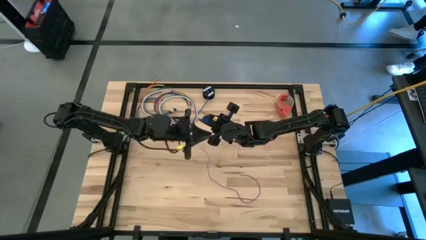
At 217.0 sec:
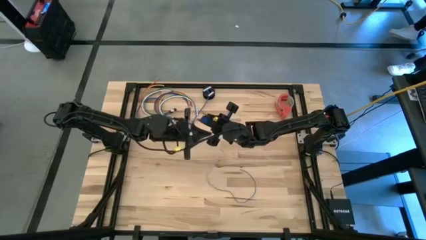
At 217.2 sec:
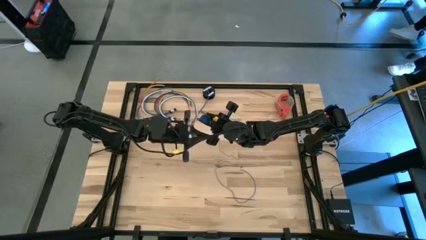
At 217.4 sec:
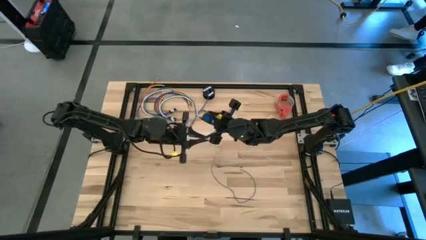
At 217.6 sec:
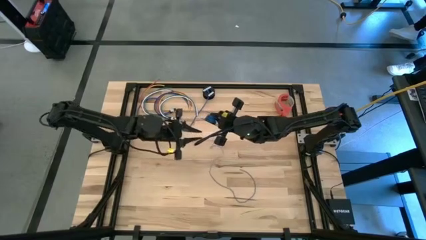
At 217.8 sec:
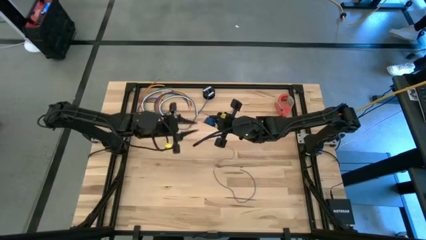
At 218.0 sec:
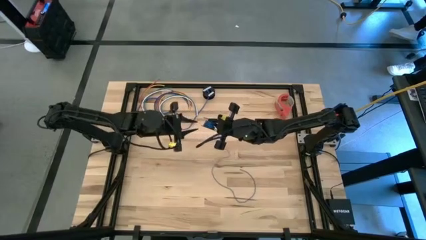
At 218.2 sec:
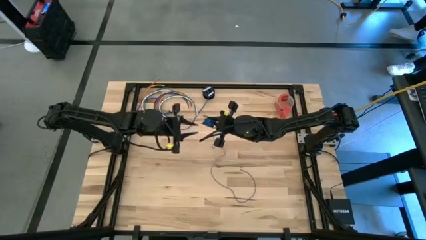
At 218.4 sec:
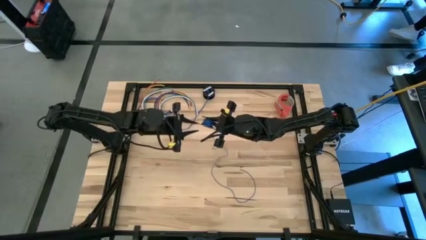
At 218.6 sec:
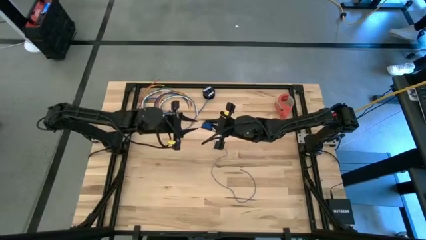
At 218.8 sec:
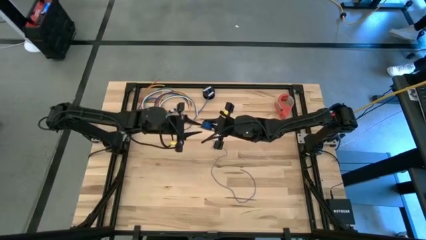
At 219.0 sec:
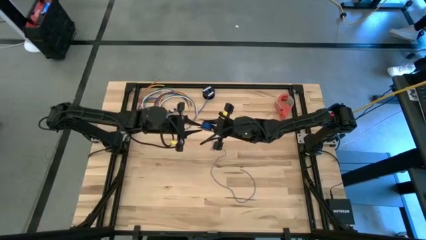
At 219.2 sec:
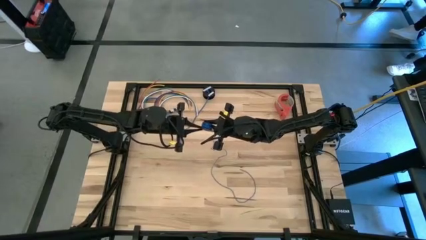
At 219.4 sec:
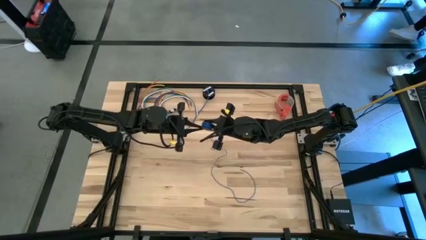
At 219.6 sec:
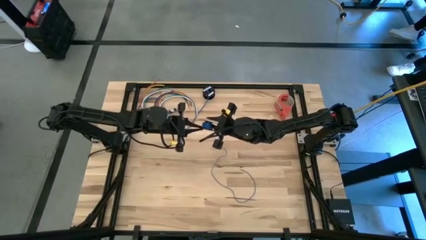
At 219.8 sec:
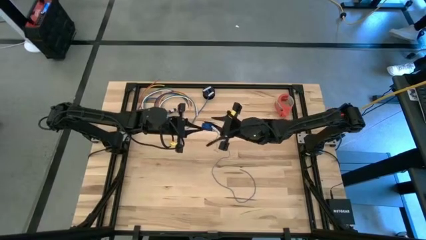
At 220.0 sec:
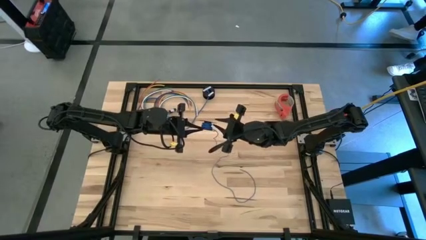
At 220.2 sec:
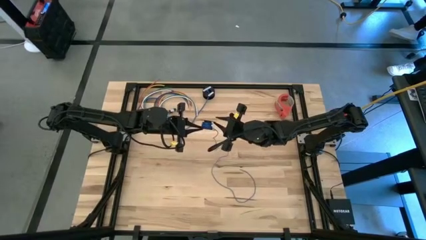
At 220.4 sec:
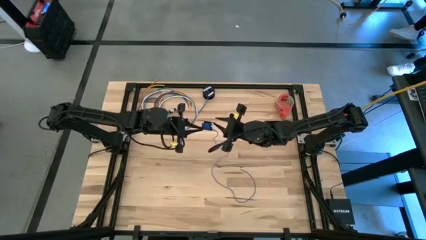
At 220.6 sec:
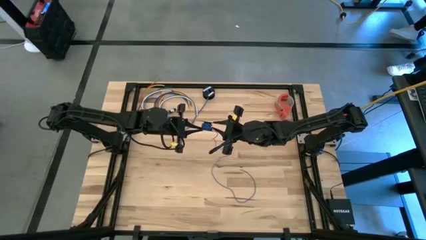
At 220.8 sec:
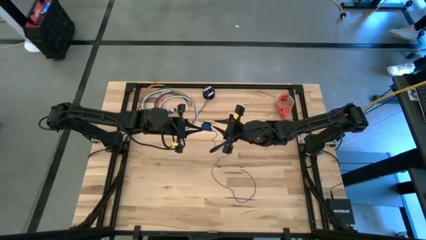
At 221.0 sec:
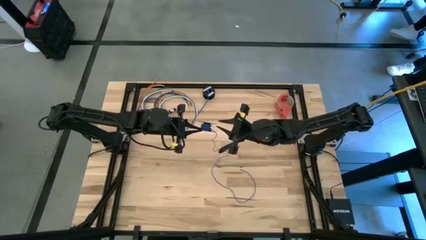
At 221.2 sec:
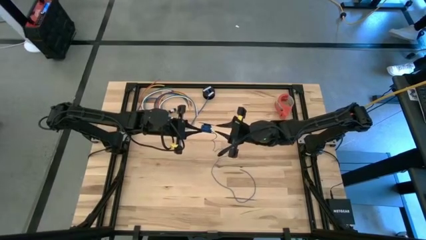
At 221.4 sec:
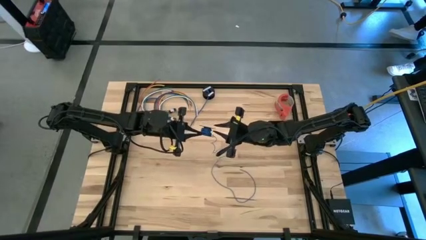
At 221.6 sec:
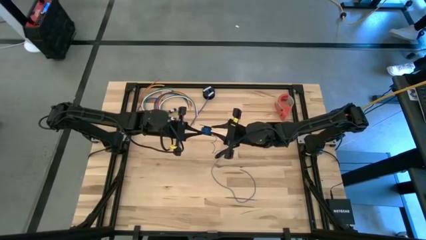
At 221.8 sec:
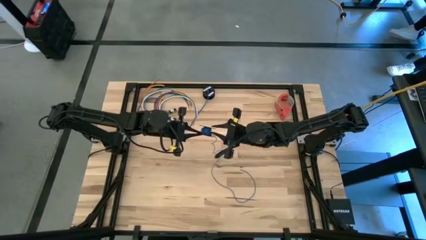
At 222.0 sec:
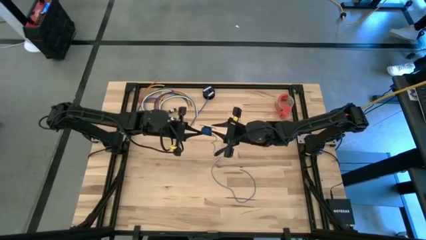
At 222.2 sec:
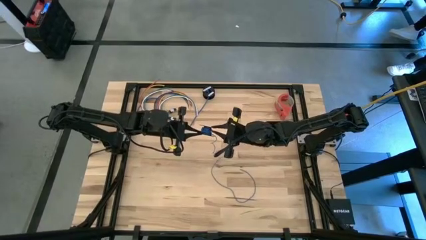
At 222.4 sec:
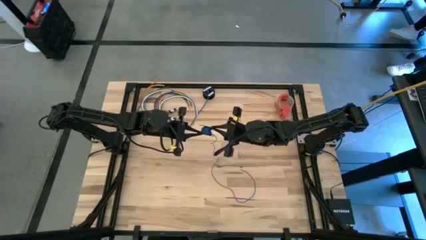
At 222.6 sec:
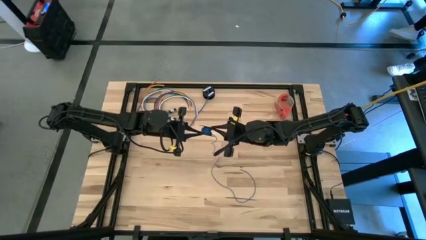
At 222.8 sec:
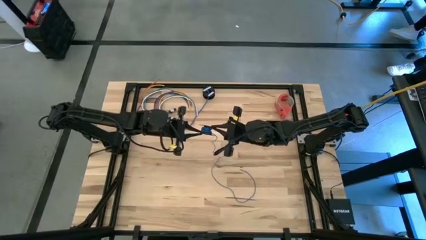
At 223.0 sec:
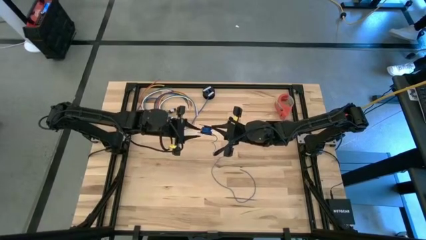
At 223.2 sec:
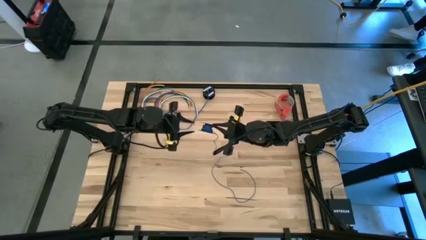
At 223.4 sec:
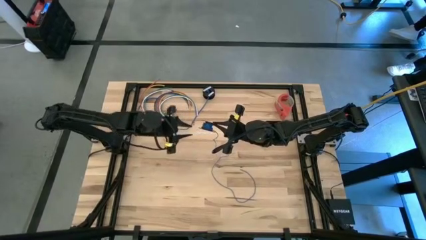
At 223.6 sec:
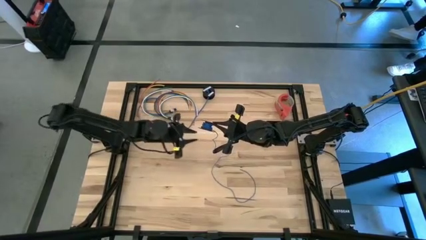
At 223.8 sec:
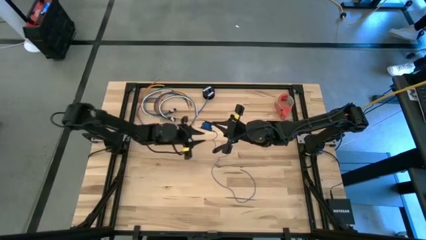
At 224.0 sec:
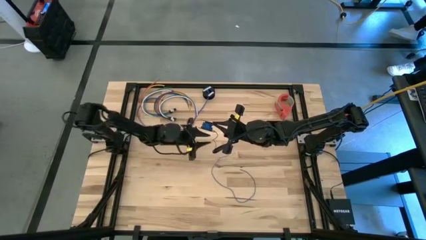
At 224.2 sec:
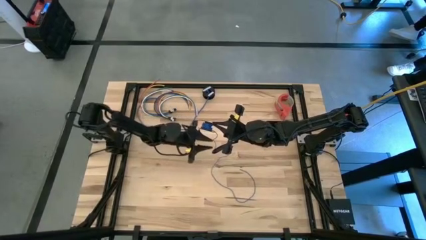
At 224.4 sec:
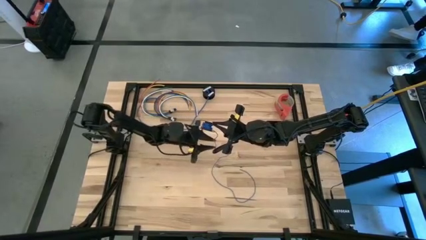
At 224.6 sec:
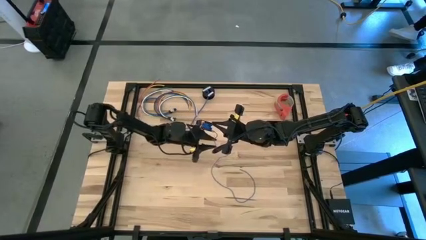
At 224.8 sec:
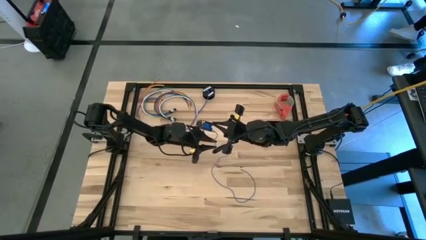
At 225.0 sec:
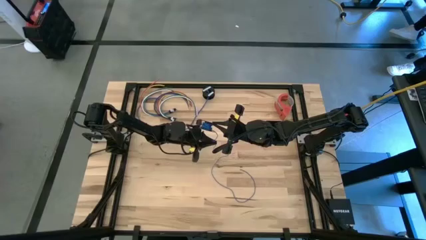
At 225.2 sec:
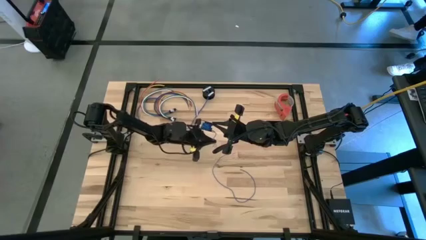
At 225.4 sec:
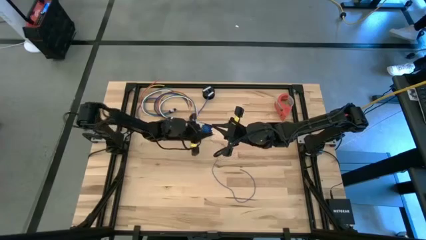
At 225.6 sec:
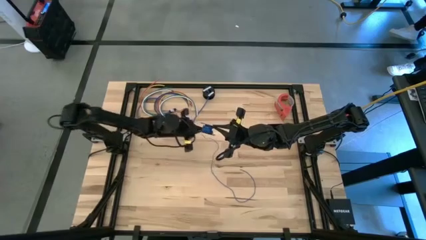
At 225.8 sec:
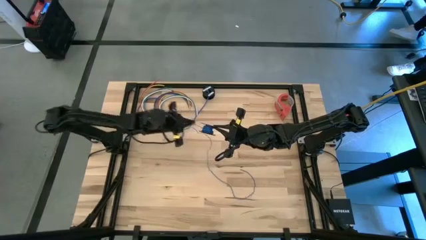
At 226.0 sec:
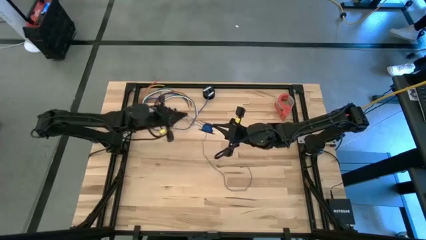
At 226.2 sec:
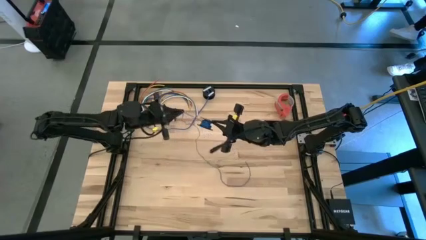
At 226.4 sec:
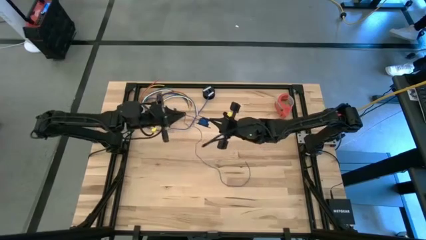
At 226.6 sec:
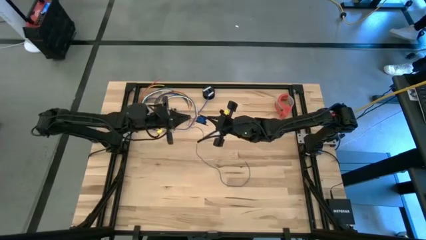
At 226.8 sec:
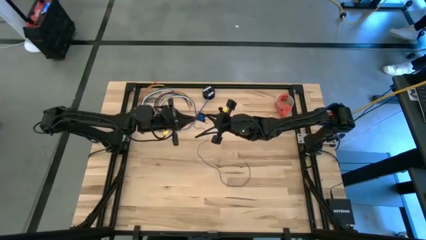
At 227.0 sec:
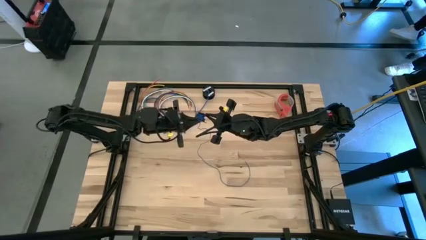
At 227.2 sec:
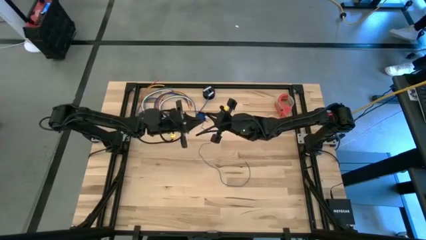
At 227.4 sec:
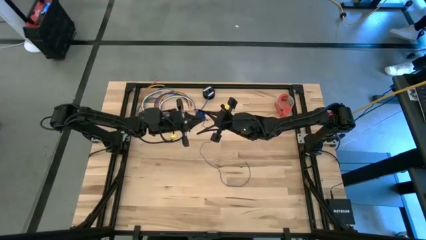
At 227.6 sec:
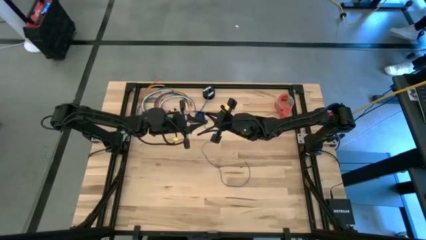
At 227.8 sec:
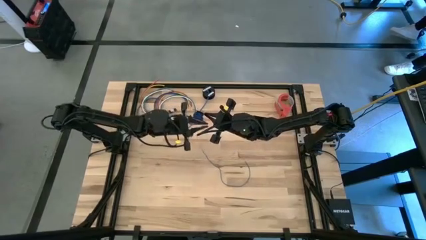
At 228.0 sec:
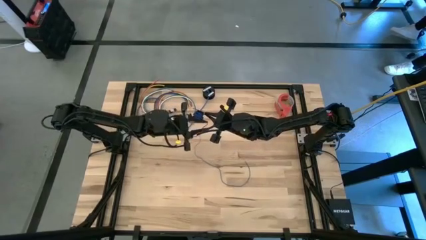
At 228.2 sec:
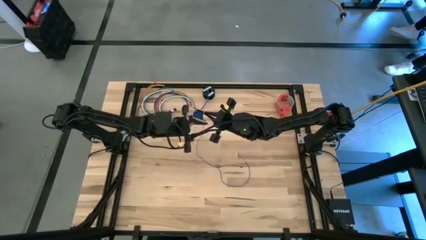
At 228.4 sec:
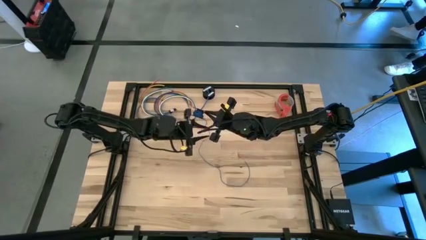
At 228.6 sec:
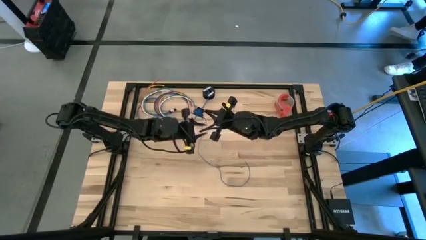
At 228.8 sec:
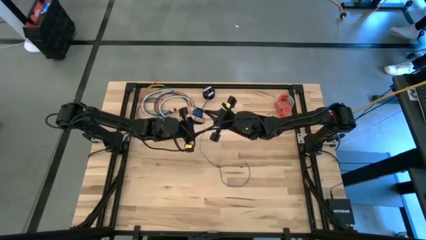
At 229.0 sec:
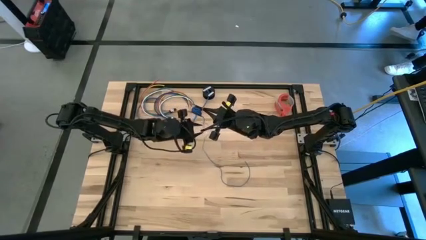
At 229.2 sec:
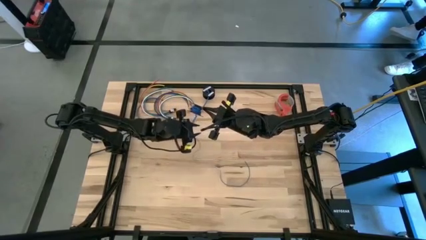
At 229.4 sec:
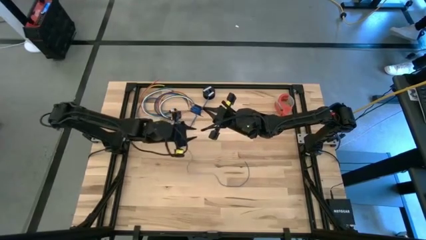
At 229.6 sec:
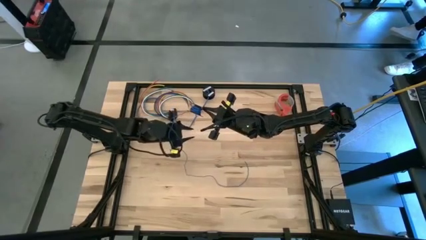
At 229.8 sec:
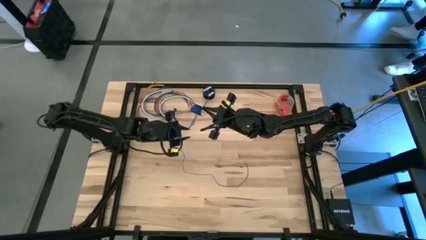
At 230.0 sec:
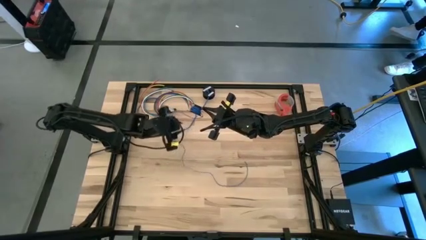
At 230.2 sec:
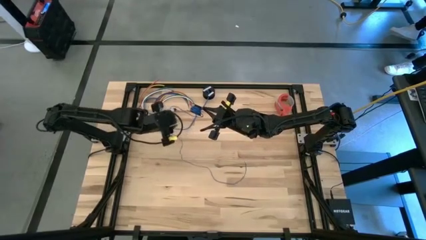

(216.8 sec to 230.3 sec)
Task: Coil cords
Coil the blue wire onto the black spool

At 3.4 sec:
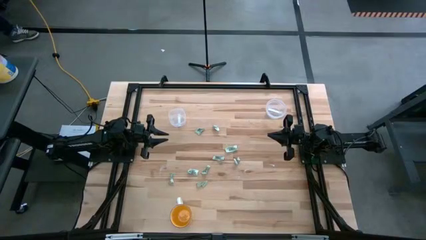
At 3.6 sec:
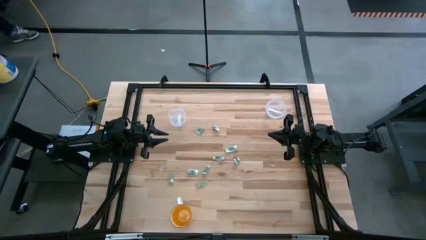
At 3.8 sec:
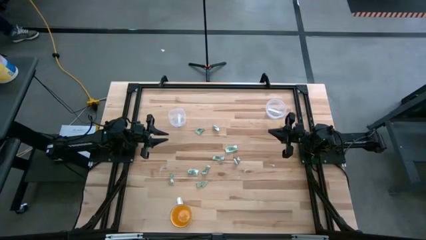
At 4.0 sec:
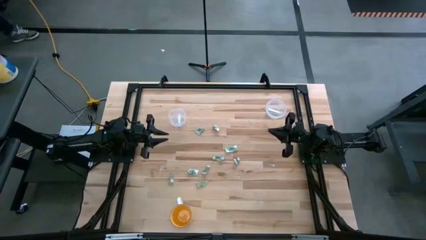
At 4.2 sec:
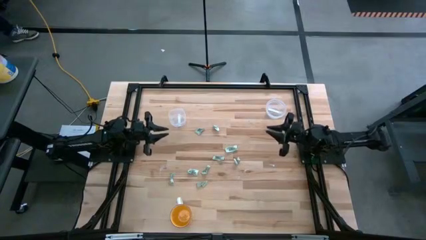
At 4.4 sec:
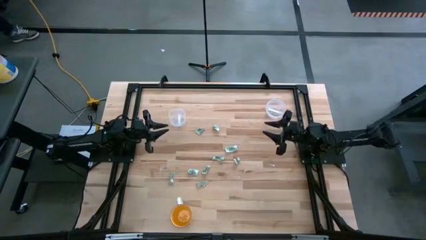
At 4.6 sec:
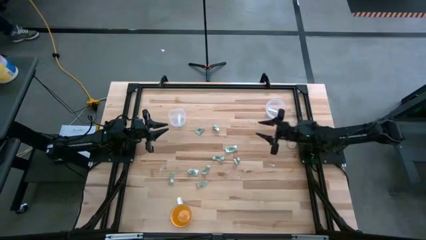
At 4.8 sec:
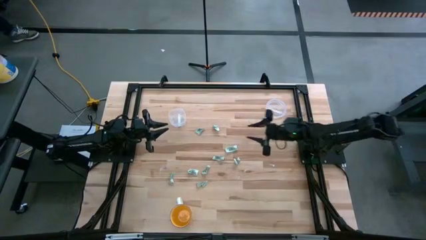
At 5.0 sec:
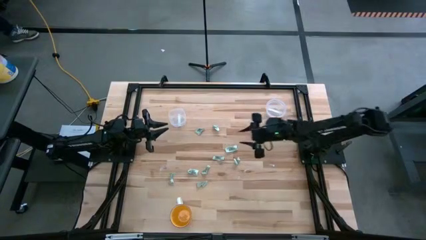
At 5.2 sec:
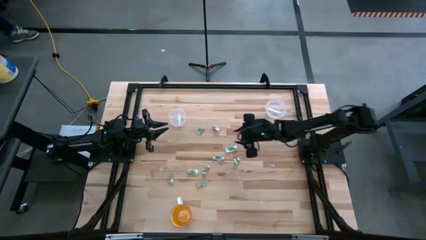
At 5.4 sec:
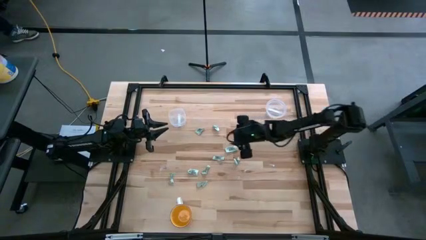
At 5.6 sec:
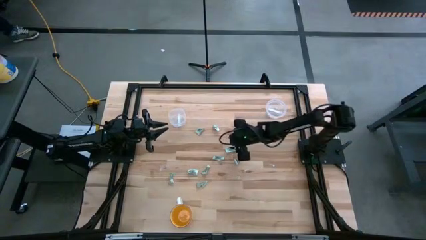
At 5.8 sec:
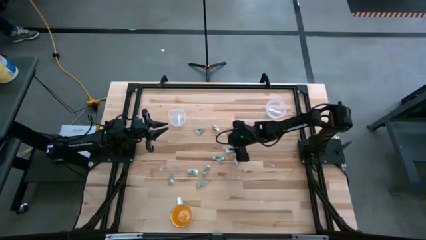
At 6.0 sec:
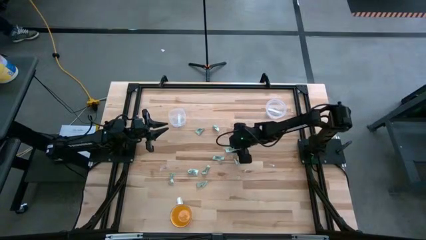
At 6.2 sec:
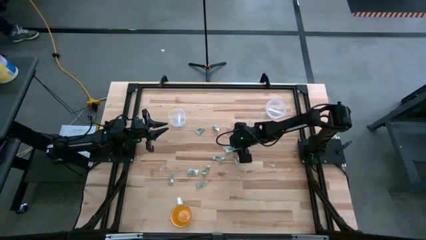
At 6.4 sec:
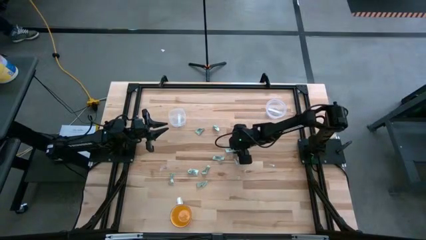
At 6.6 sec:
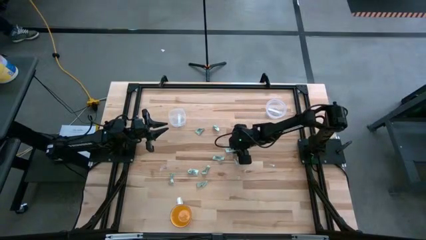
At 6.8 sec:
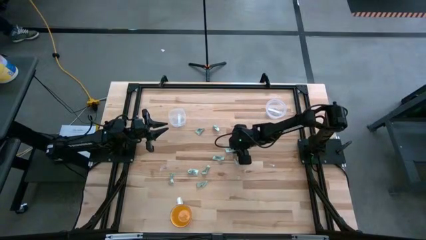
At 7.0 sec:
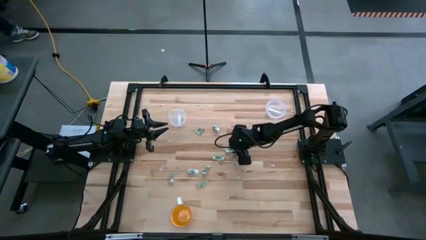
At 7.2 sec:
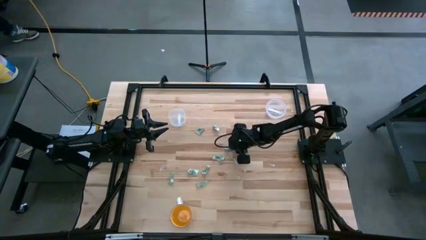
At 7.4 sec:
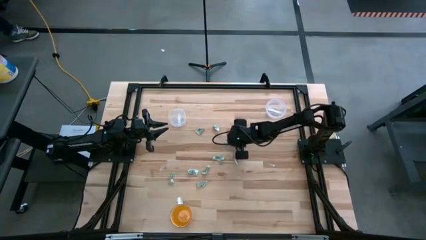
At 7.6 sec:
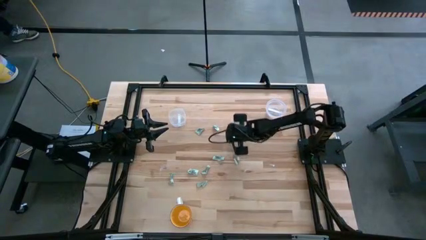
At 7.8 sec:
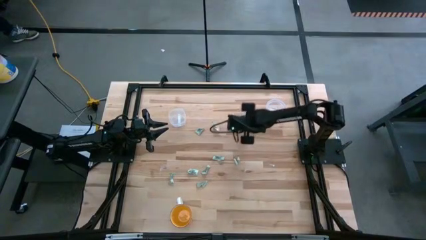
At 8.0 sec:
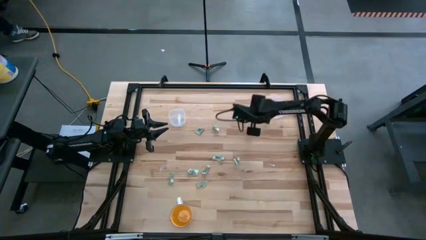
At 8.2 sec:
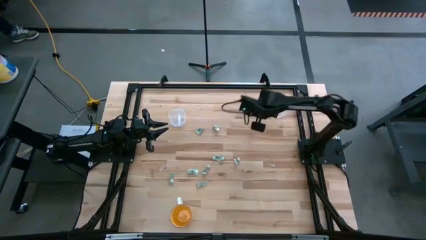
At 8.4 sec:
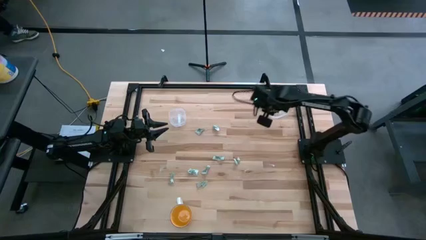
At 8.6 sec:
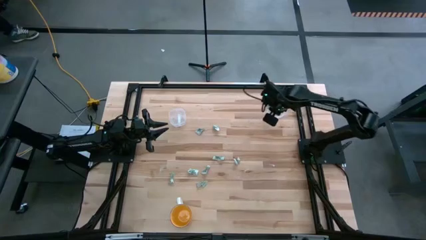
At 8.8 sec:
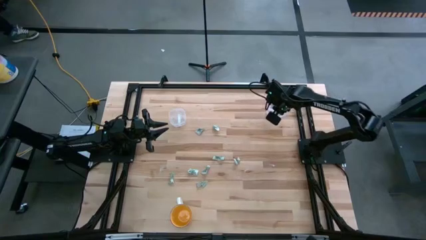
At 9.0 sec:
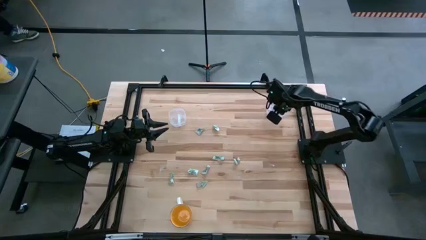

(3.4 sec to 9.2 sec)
Task: Pick and place items into bin
Put the stevia packet into the right transparent bin
